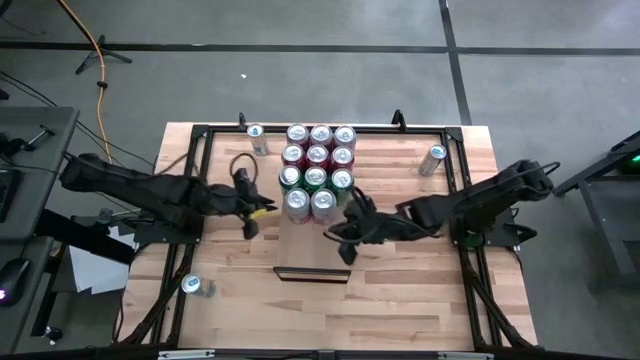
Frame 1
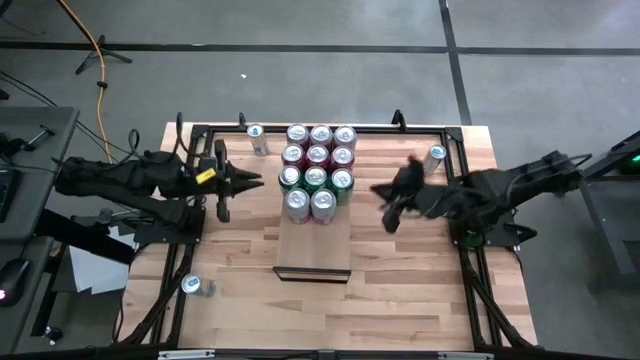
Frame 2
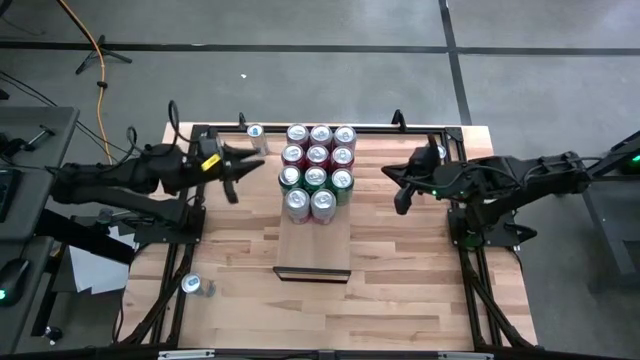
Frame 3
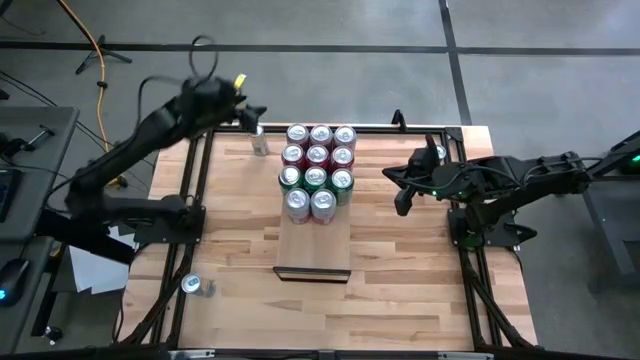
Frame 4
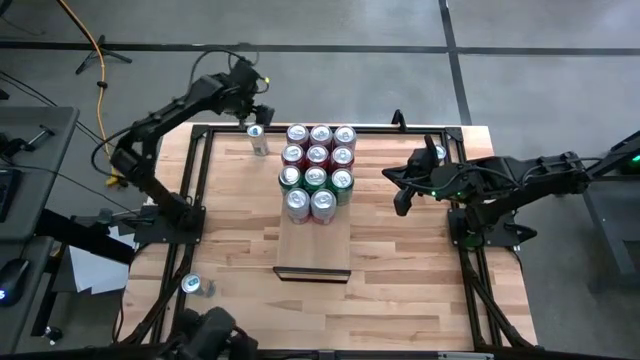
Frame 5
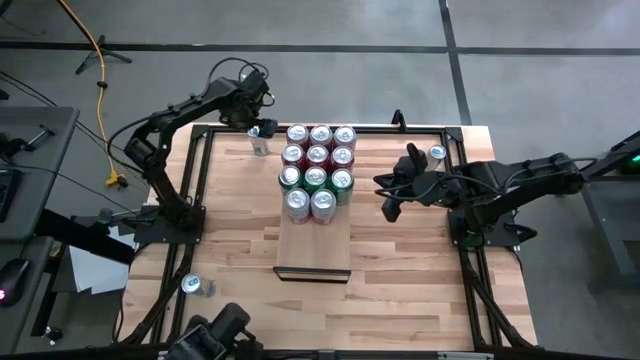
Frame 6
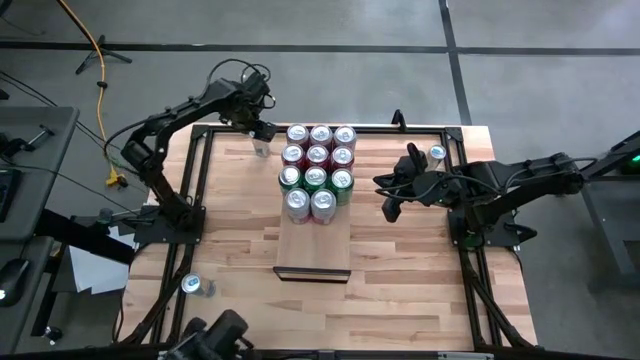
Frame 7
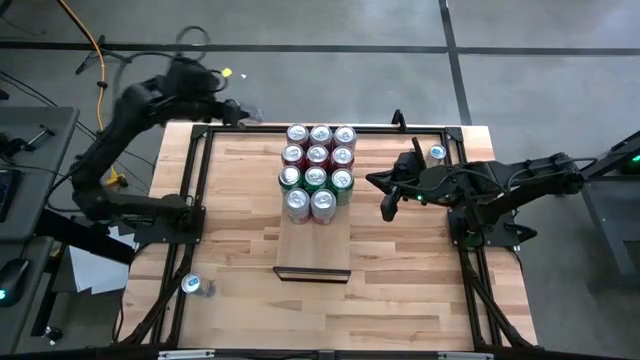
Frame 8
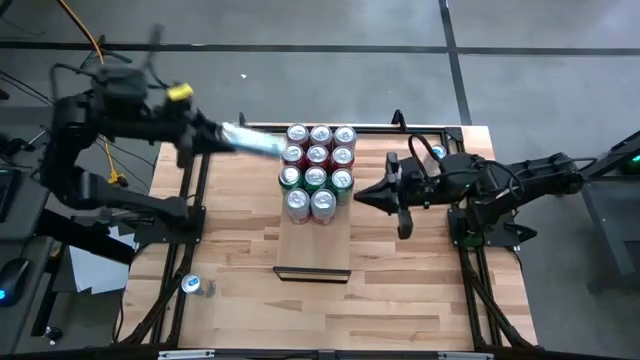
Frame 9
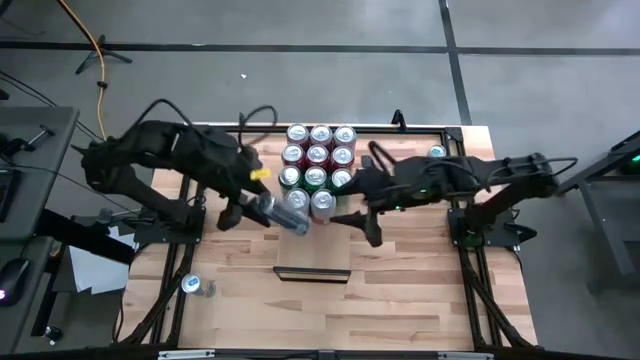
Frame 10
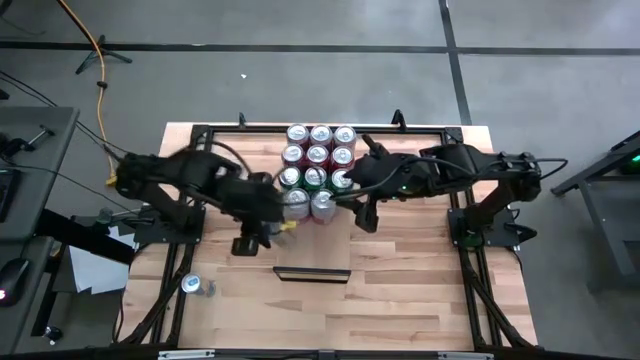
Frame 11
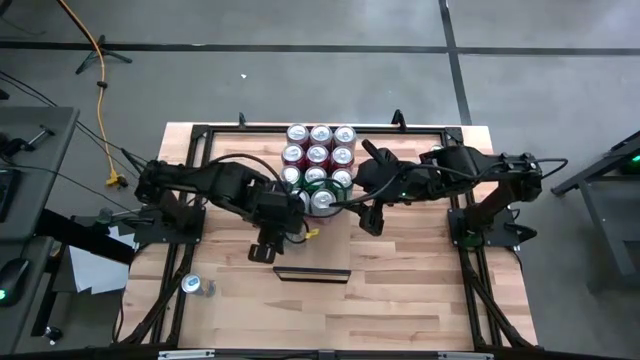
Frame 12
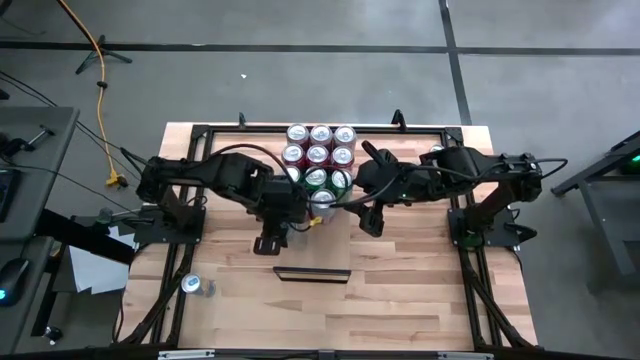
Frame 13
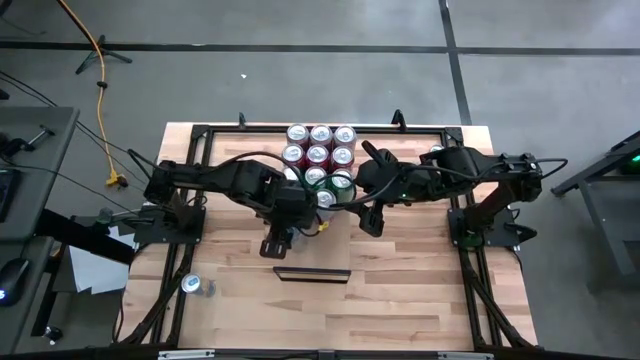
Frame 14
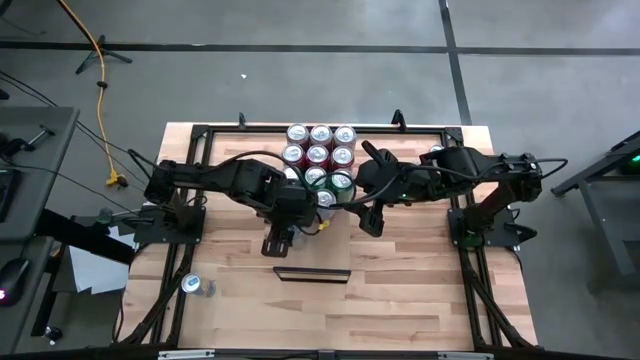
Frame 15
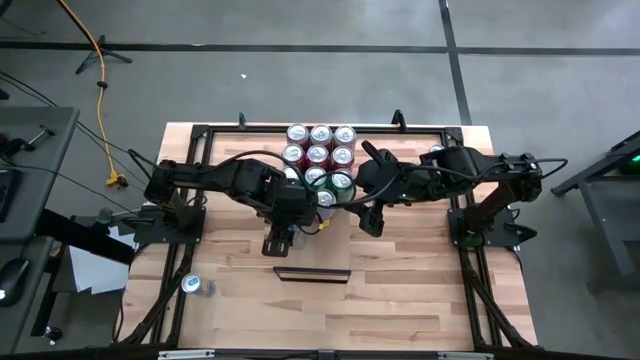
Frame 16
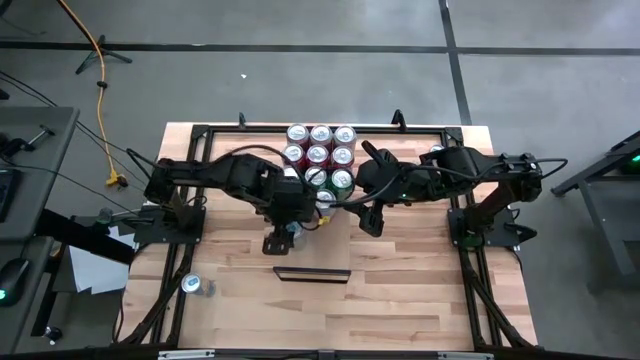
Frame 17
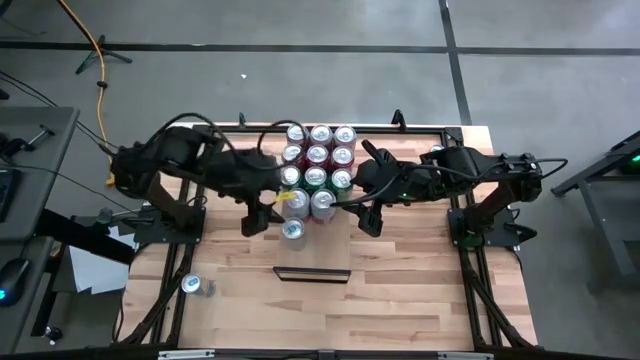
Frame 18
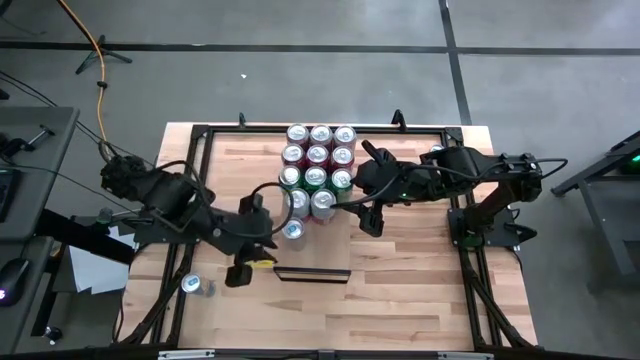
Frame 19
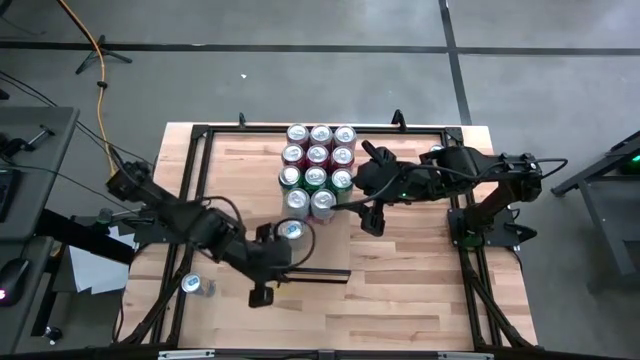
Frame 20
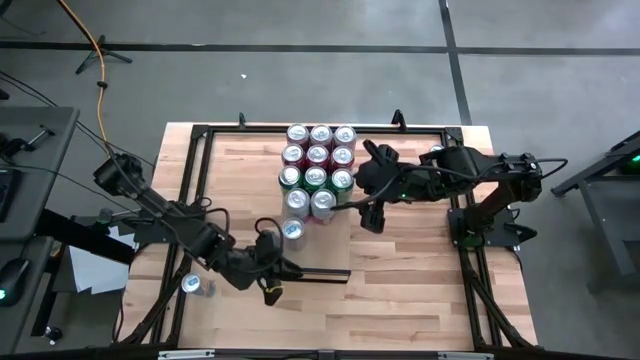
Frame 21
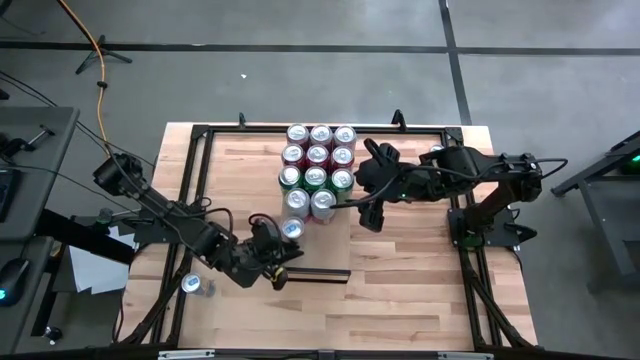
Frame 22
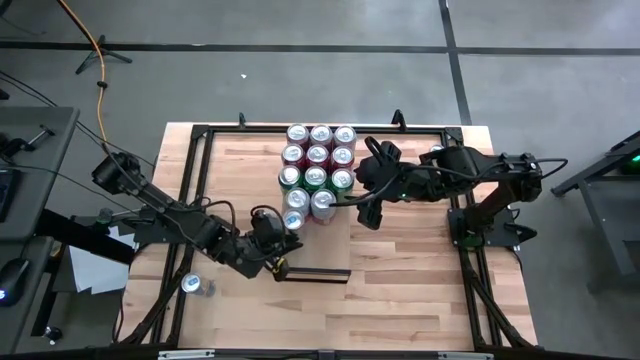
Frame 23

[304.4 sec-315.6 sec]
Task: Place canned beverage on shelf
Put the top left blue soda can on the shelf

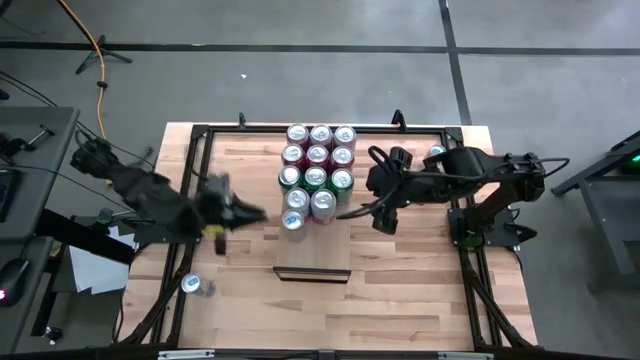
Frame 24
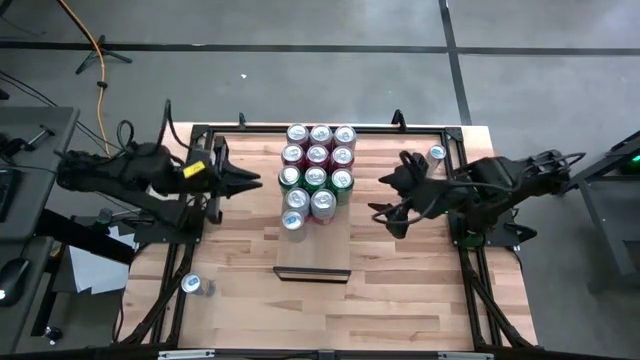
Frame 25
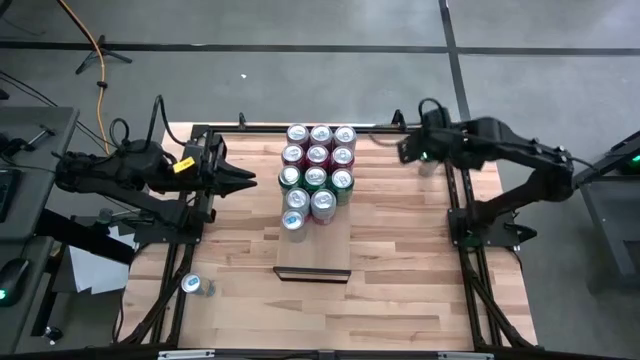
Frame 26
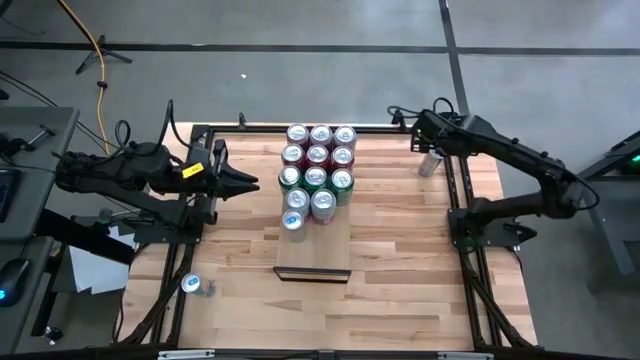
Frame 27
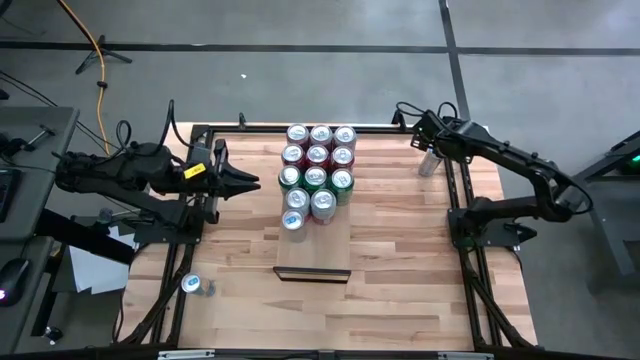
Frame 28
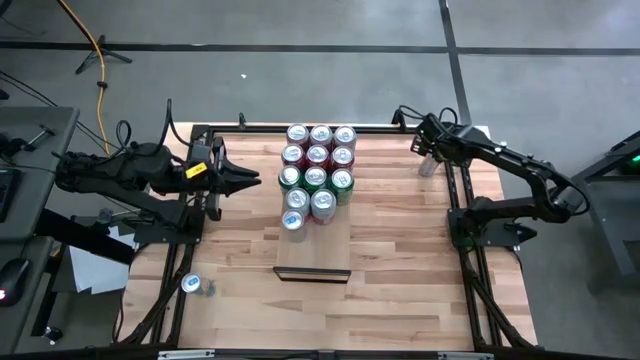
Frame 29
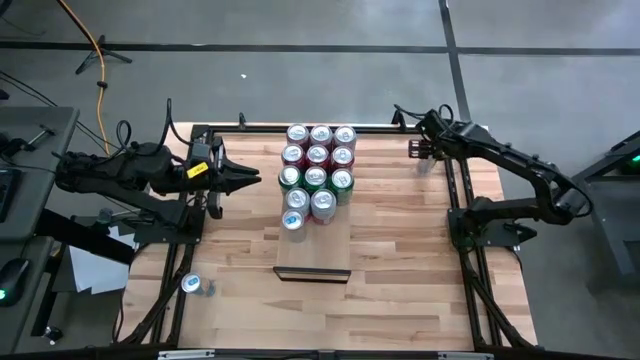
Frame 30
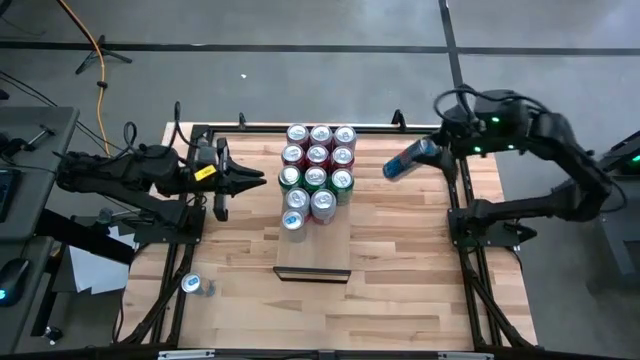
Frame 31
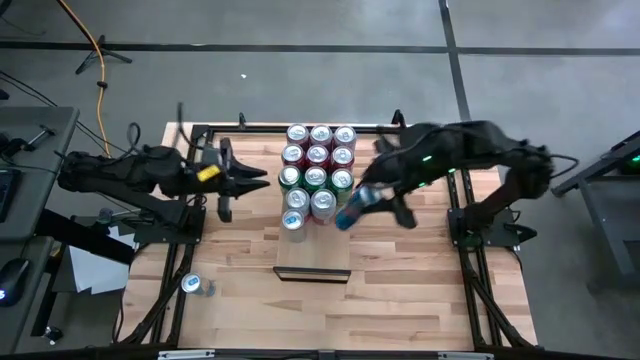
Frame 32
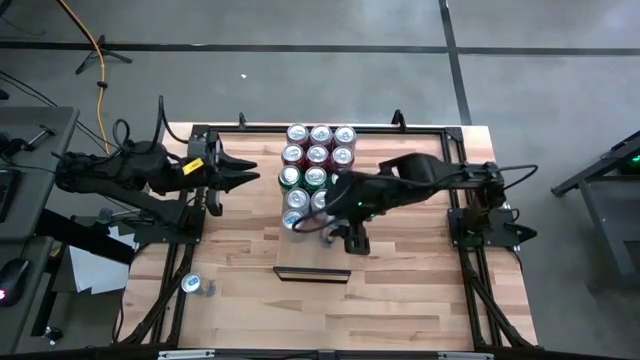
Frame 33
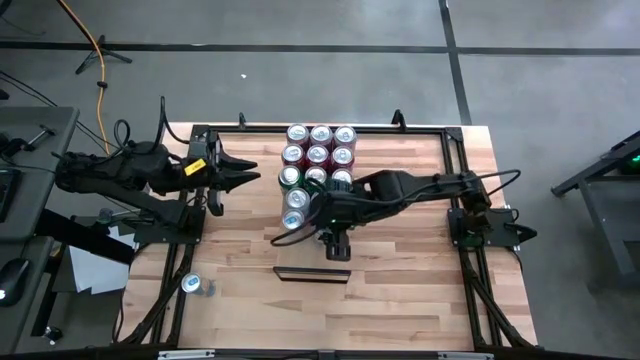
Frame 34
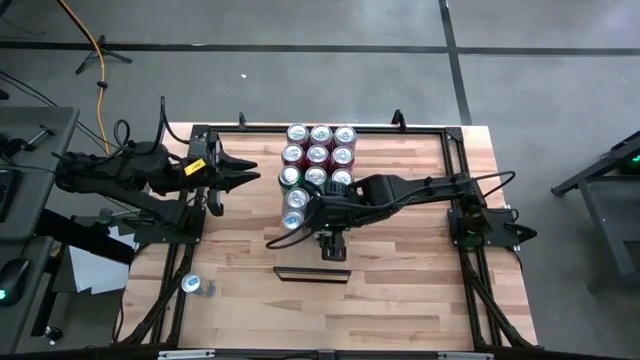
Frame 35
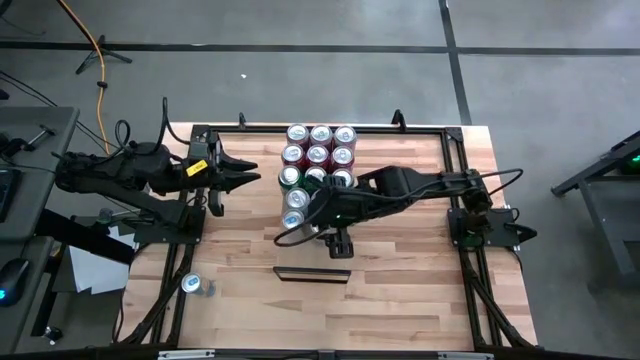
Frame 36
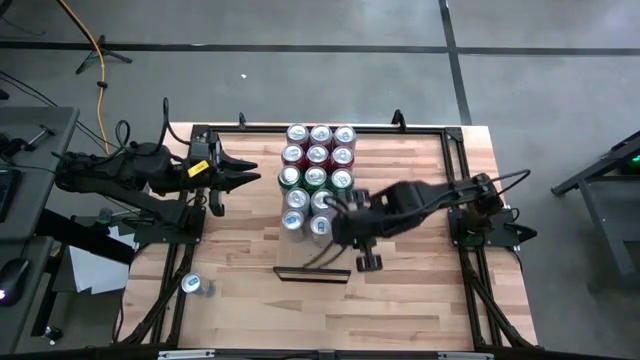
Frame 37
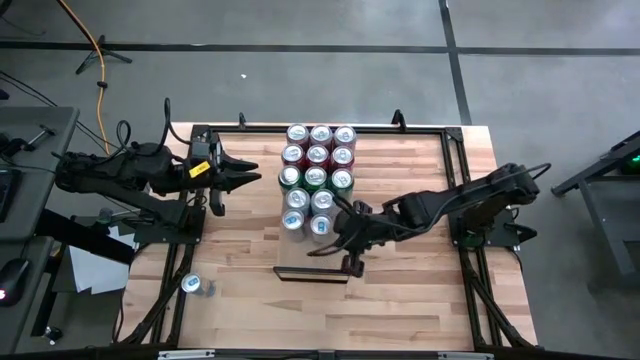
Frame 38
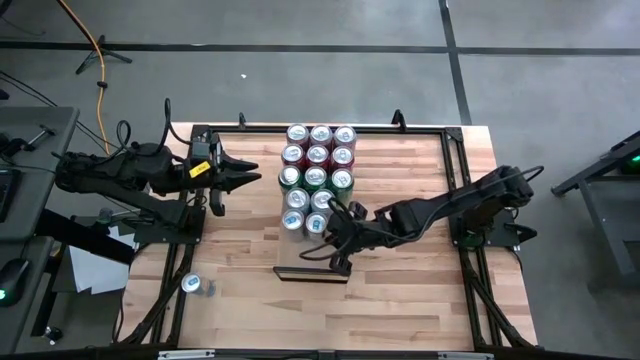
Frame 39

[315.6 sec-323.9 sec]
Put the top right blue soda can on the shelf
